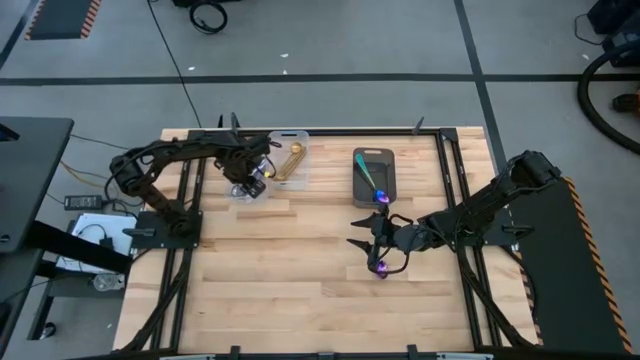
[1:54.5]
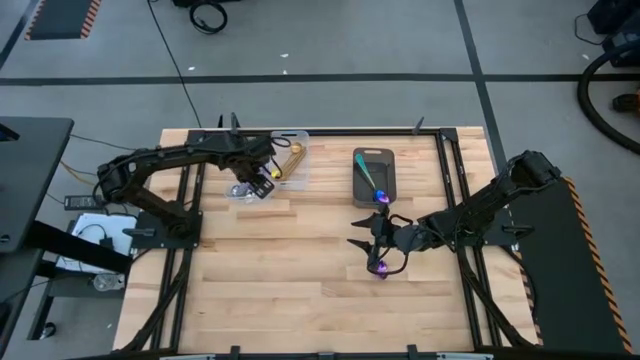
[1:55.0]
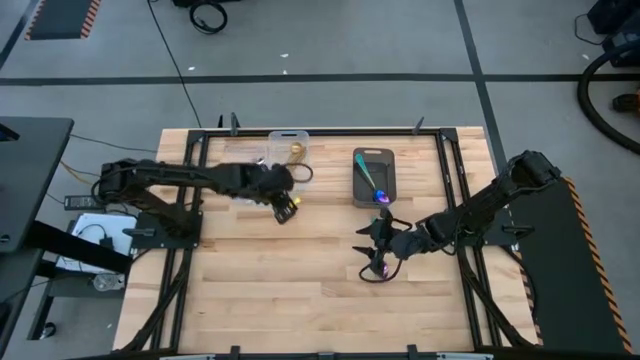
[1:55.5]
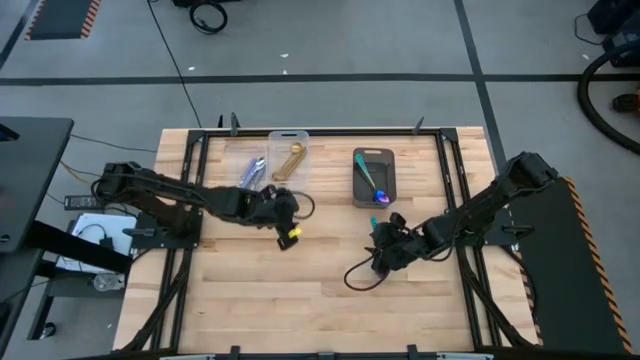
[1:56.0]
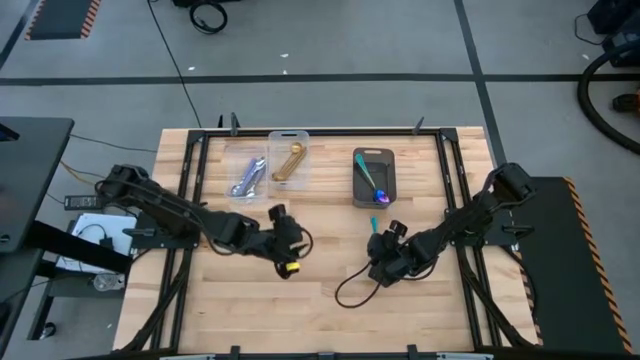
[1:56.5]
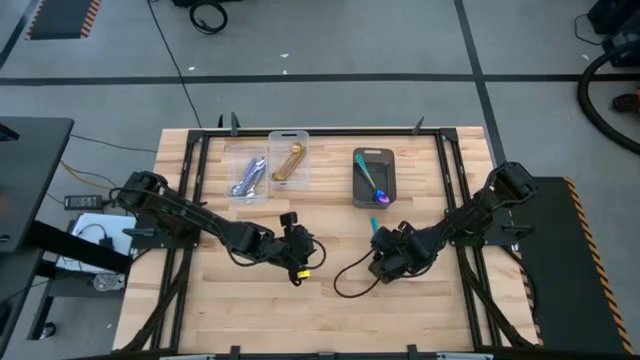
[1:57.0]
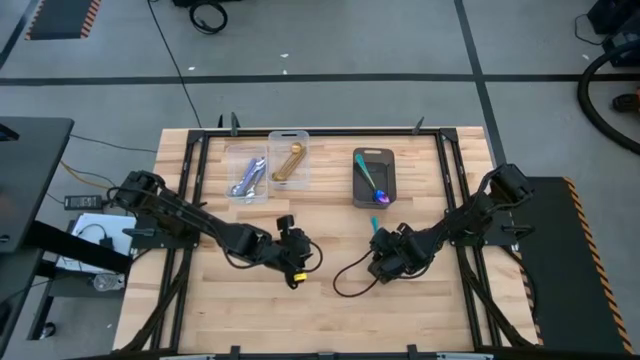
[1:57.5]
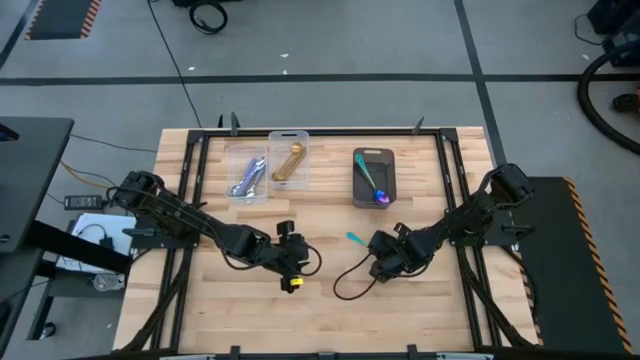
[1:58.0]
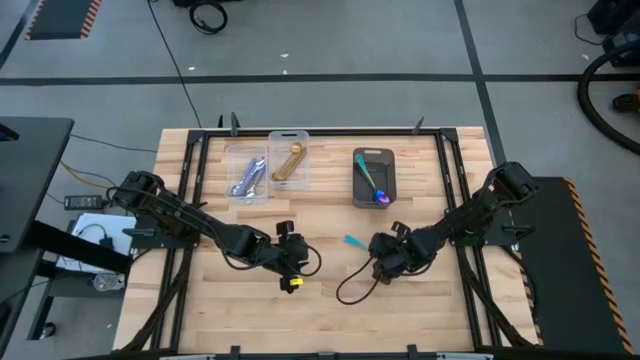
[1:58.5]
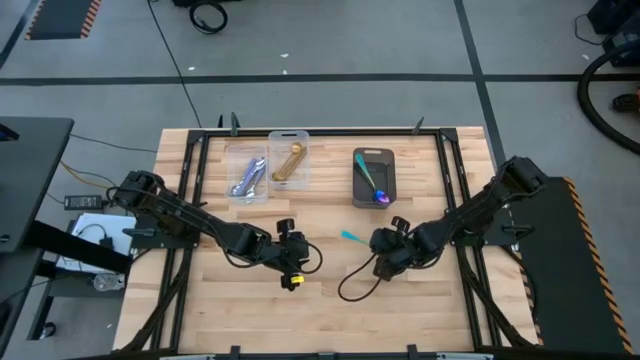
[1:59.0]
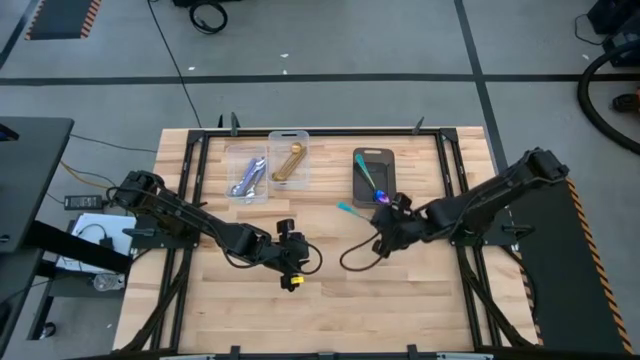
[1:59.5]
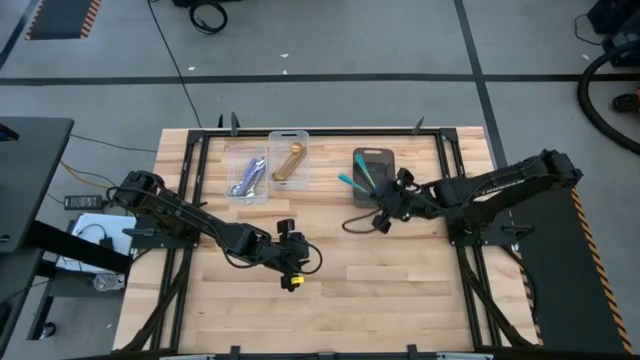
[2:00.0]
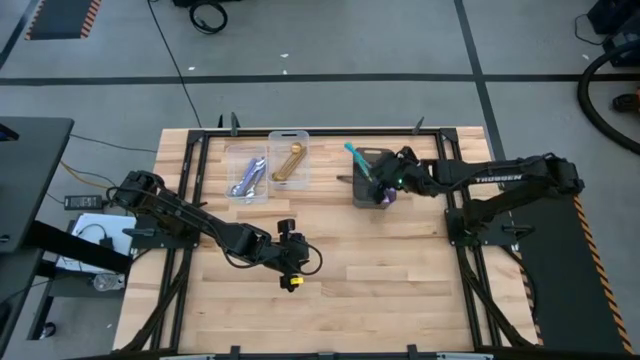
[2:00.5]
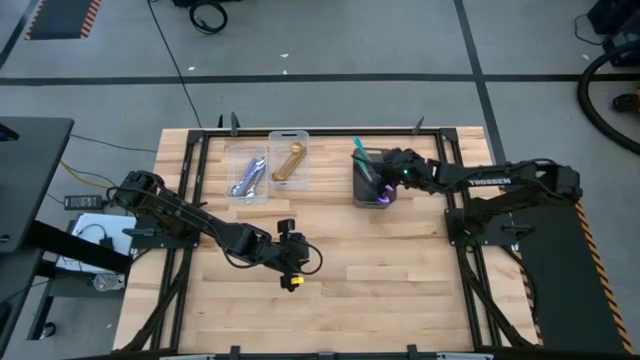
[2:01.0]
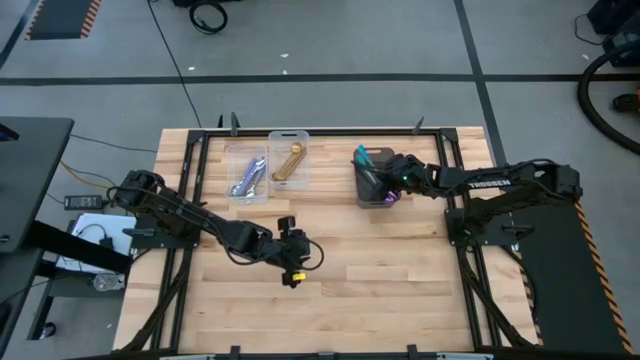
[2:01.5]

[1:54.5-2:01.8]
Task: Sort silverware by color (type)
Put the blue spoon into the black bin

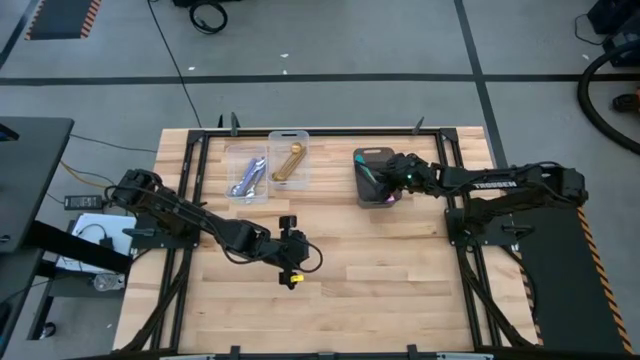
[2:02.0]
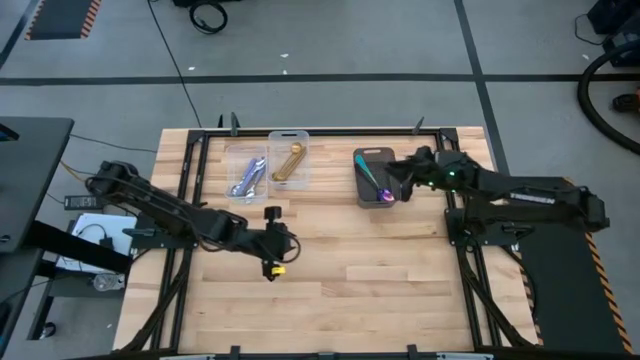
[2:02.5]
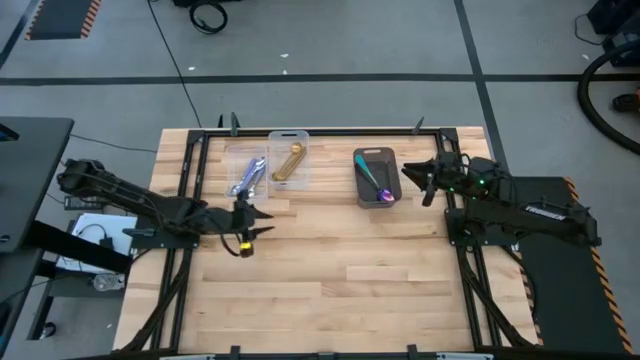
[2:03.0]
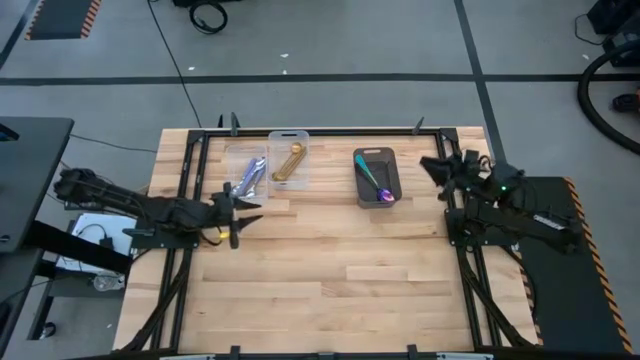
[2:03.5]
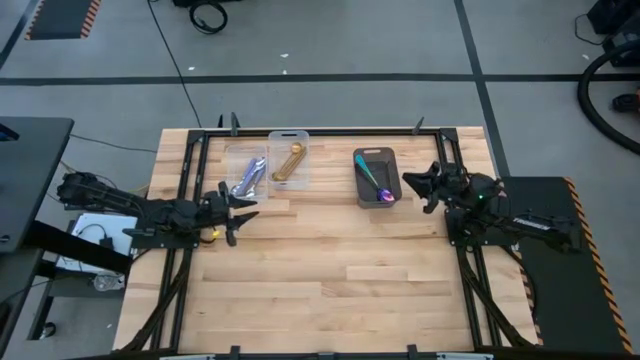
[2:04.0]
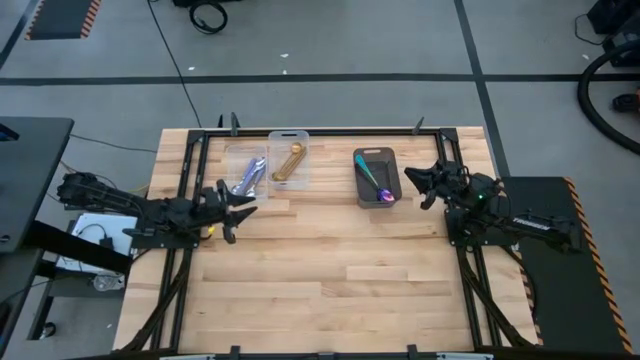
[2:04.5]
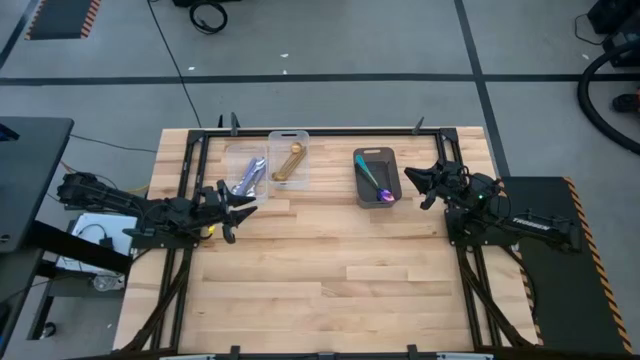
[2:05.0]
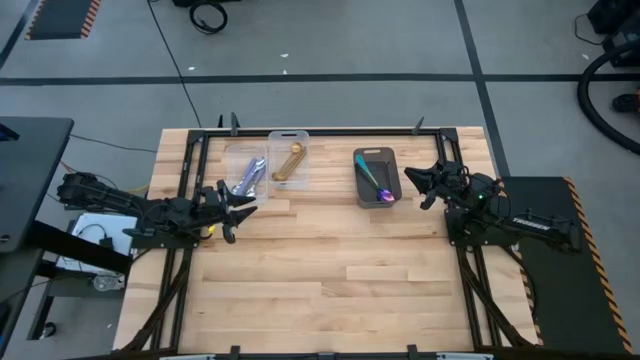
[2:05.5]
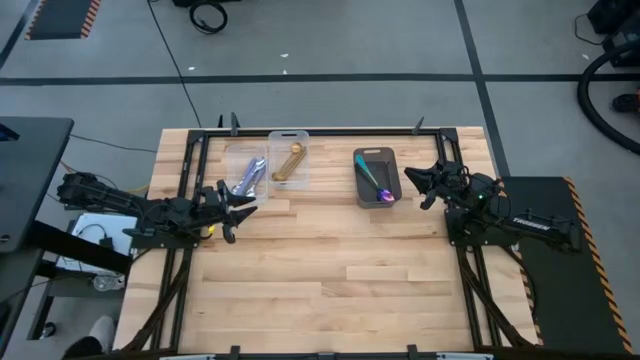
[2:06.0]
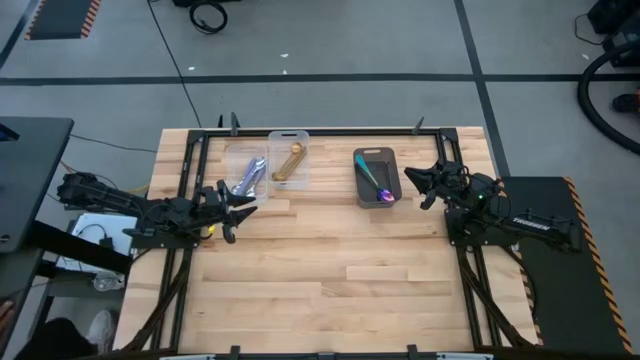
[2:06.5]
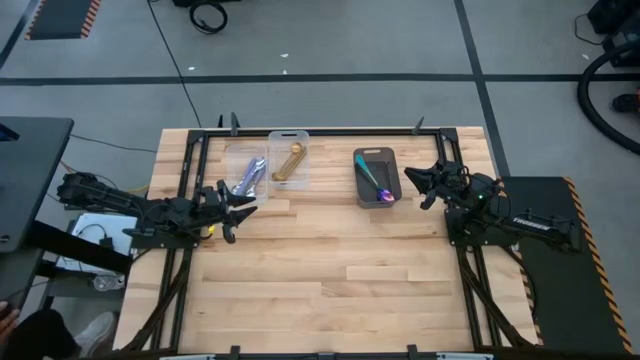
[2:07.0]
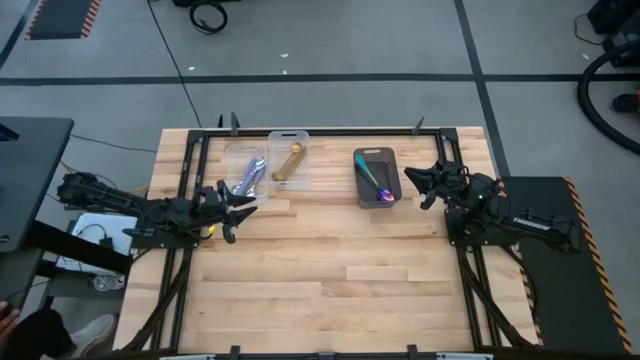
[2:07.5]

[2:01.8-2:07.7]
Return to Home Position

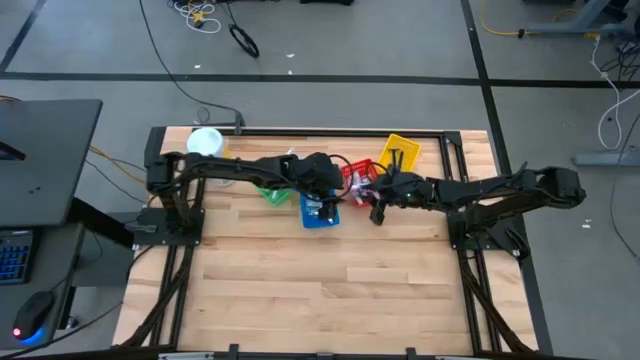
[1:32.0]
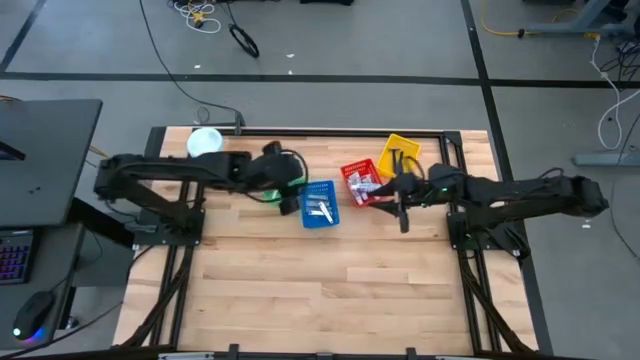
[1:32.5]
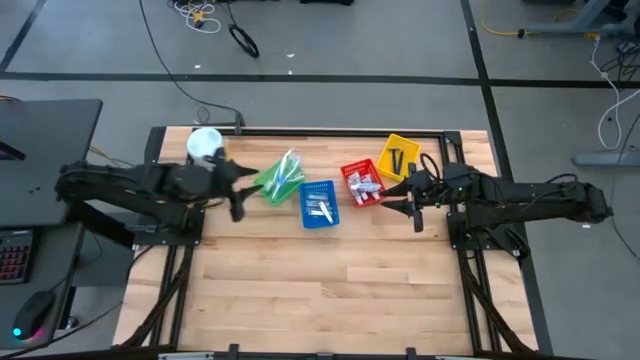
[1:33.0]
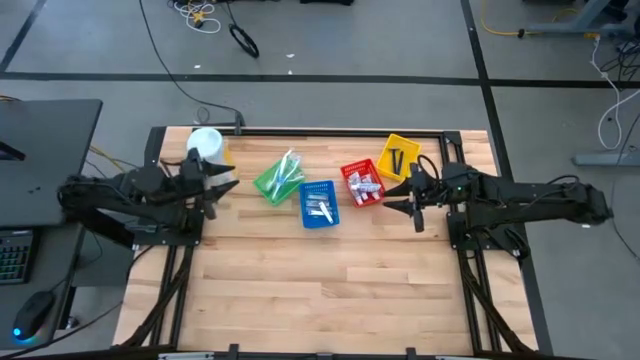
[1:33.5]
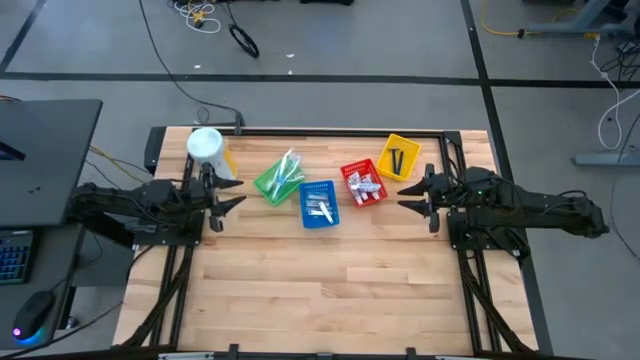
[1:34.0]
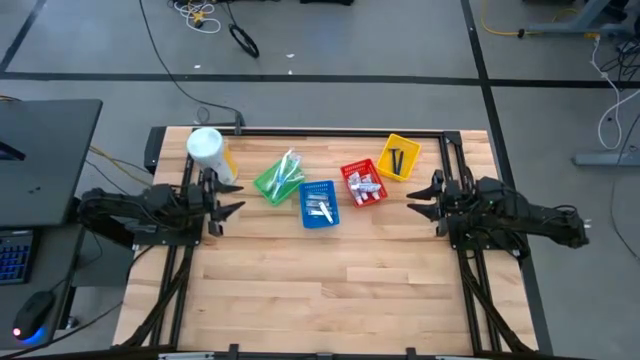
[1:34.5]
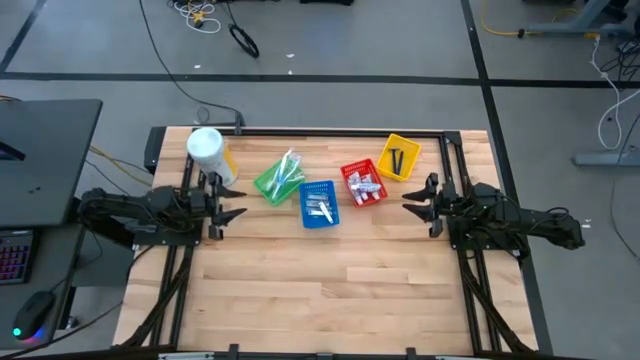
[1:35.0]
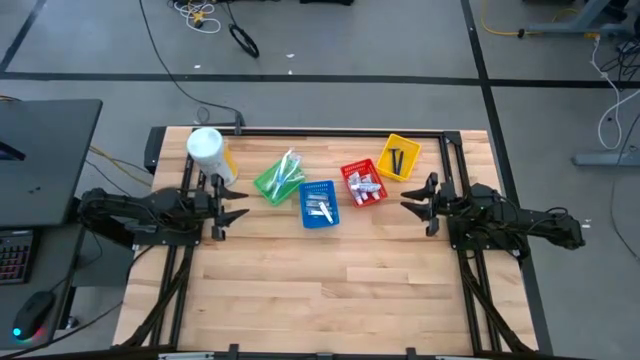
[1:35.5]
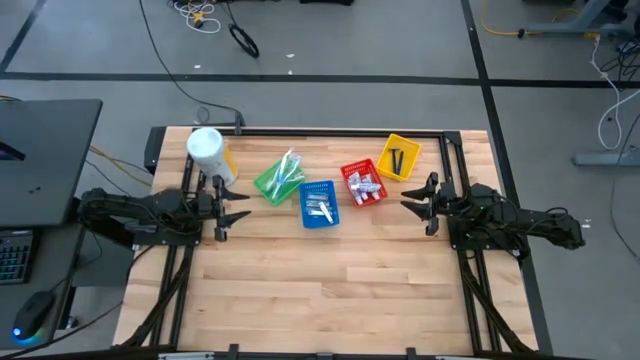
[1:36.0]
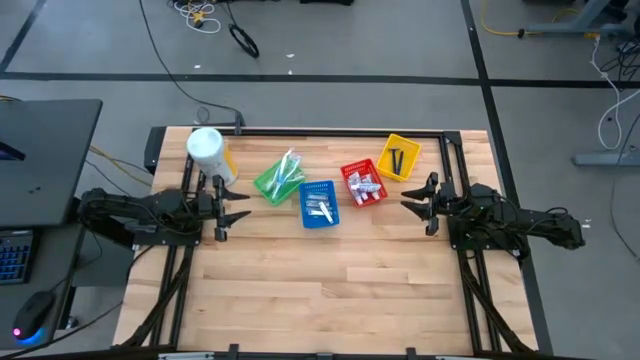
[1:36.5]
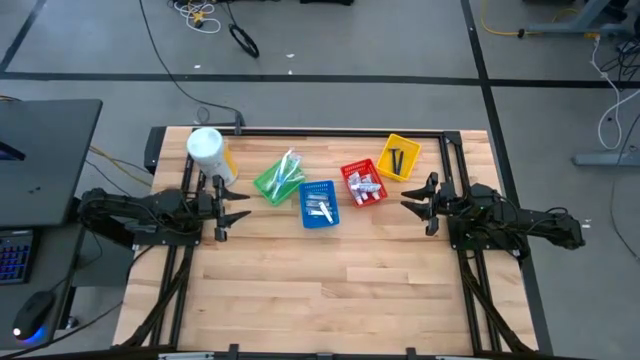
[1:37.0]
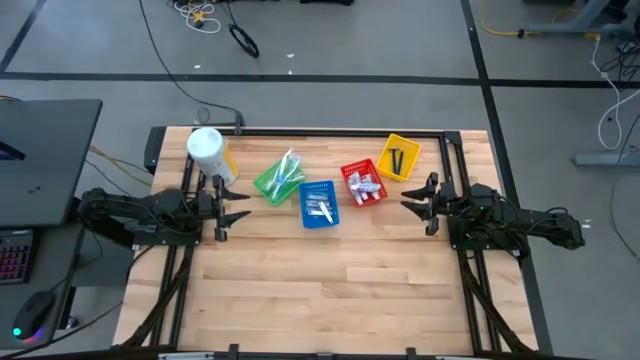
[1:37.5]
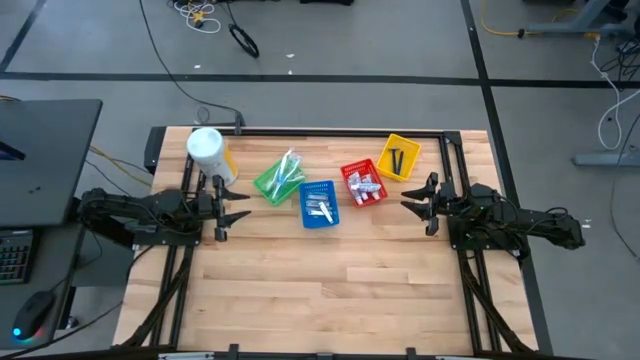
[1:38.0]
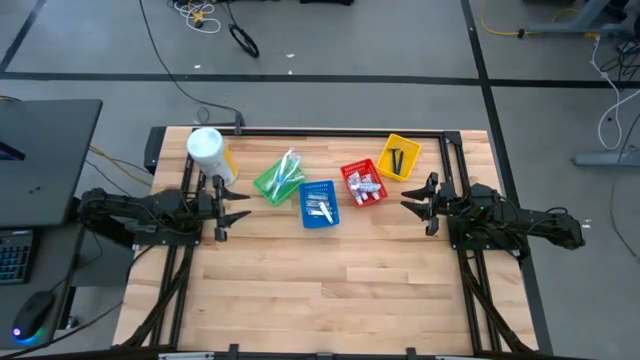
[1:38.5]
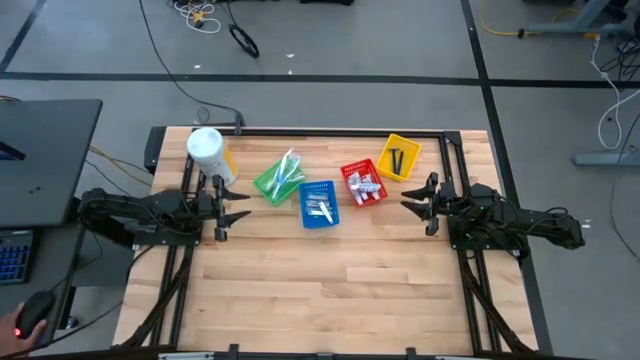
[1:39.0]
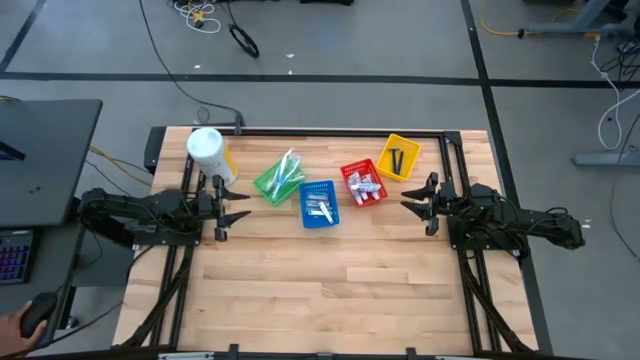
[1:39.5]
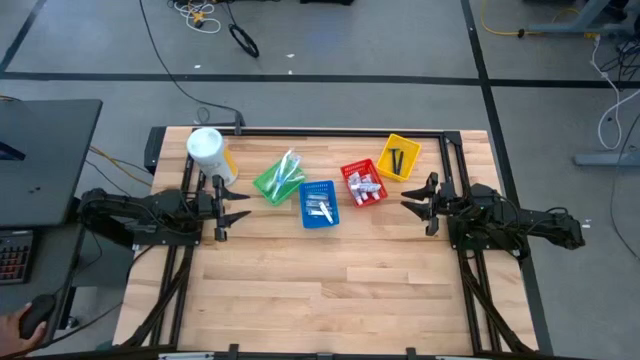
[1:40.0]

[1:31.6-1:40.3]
Task: Pick & Place Travel size toiletries
Return to Home Position
